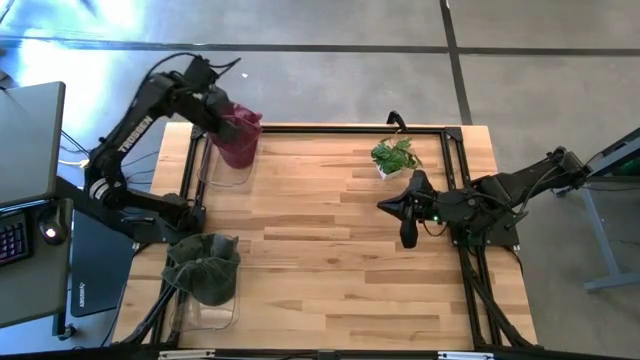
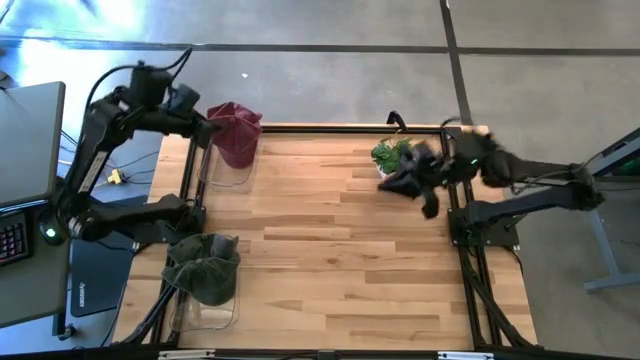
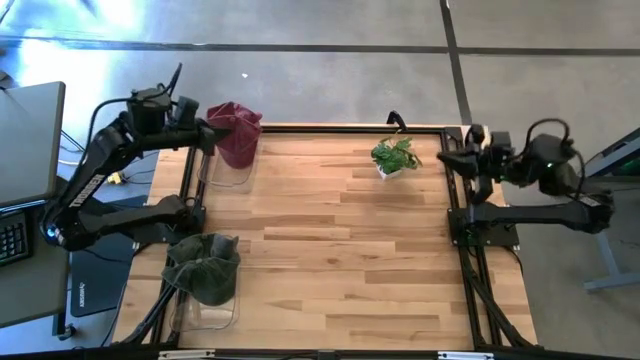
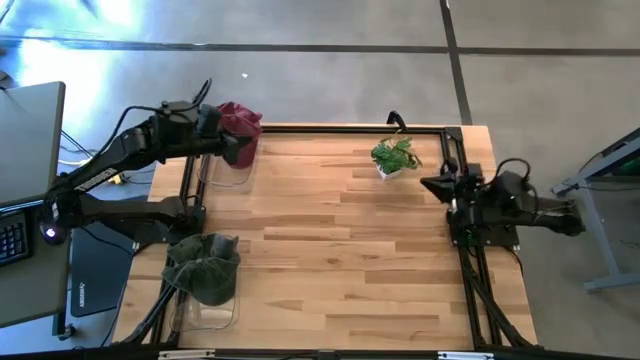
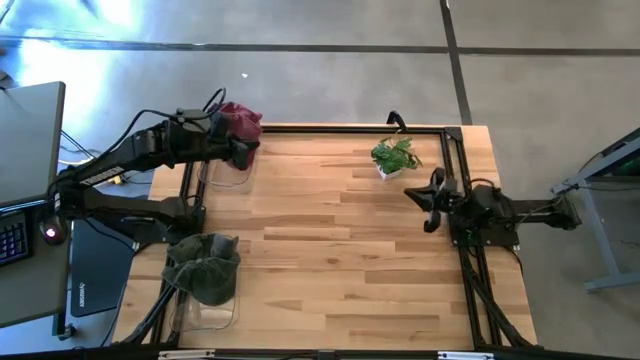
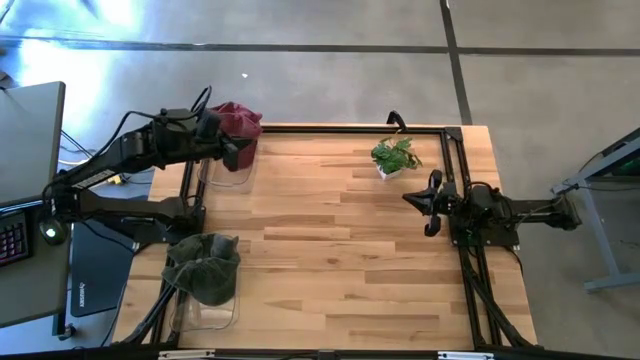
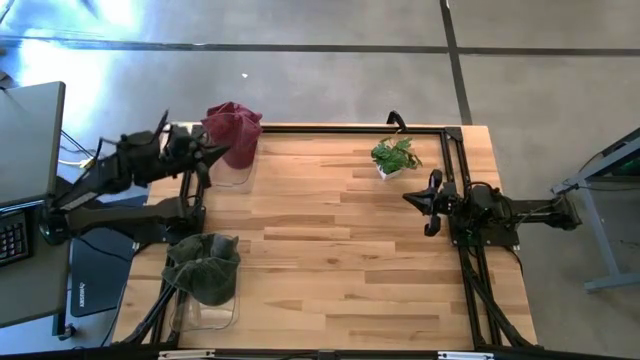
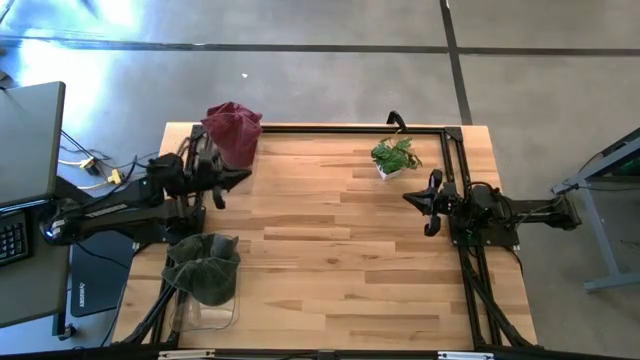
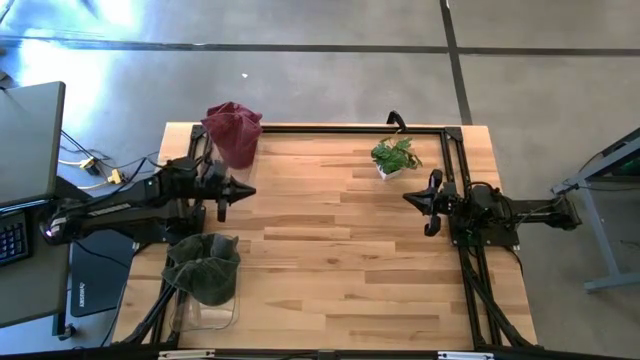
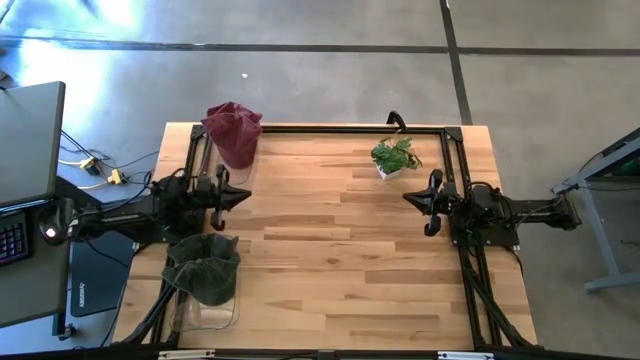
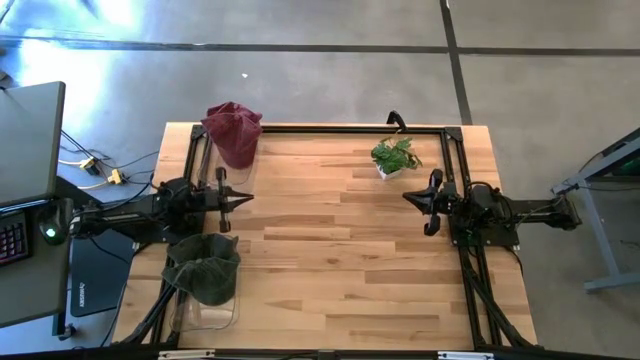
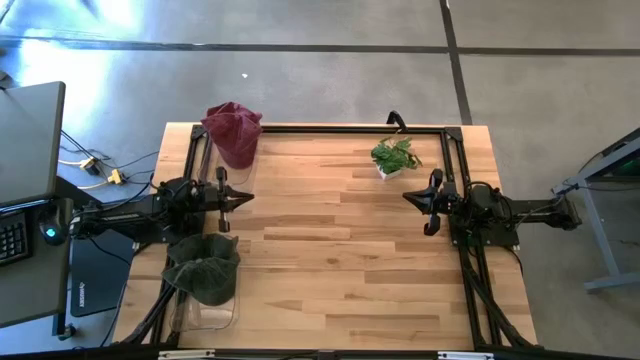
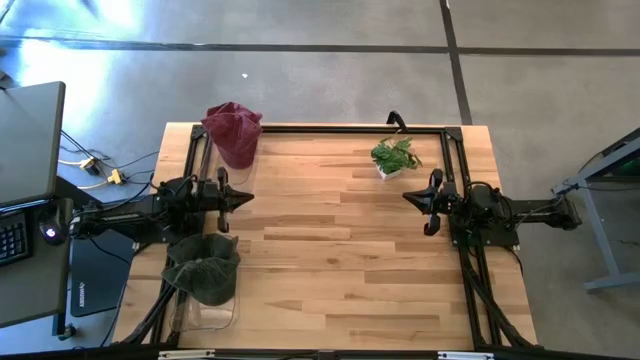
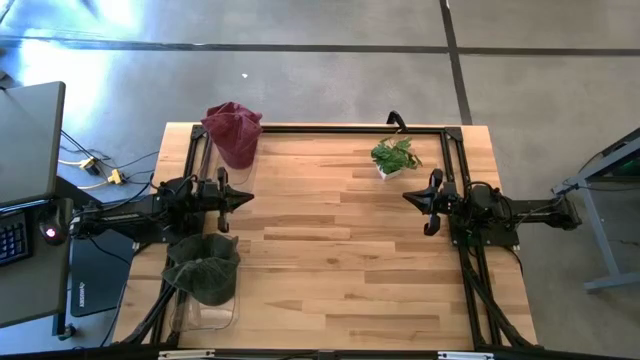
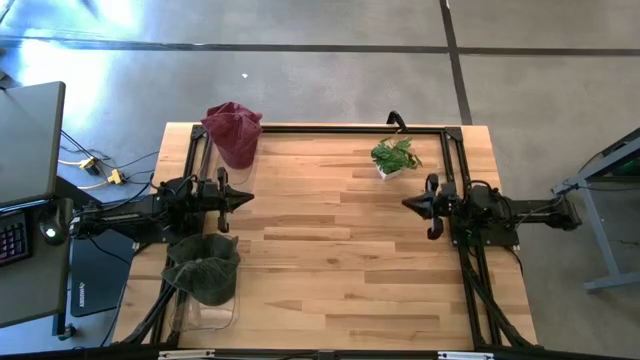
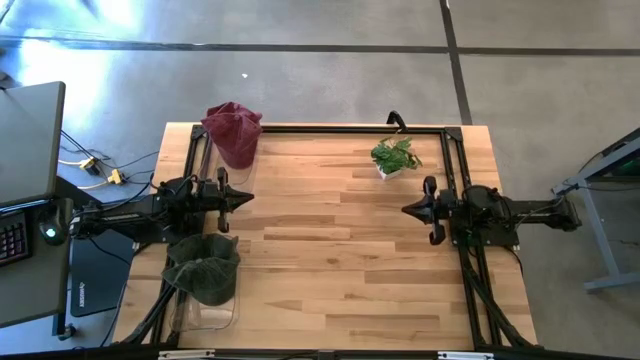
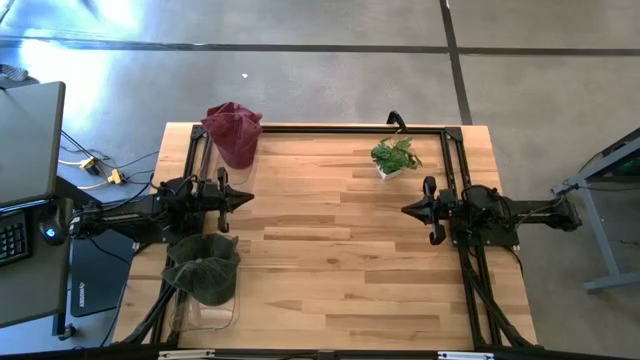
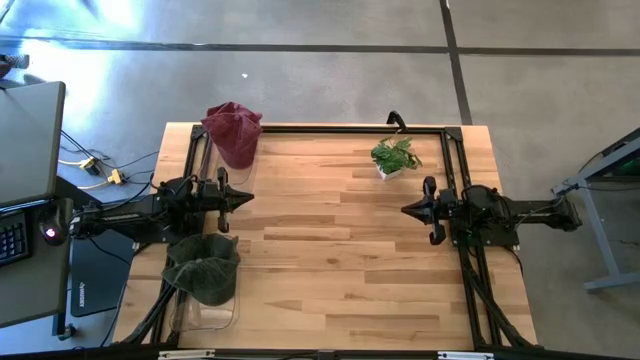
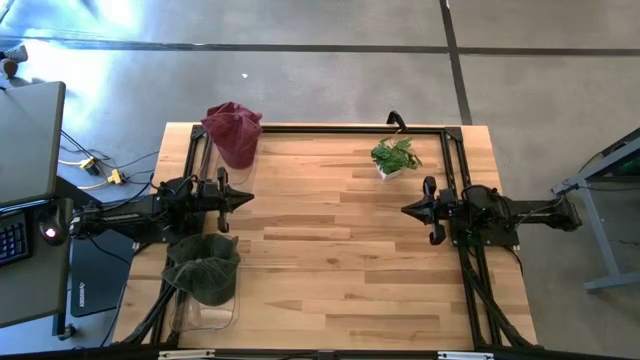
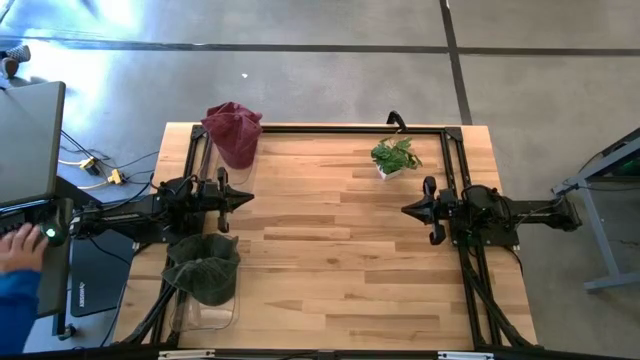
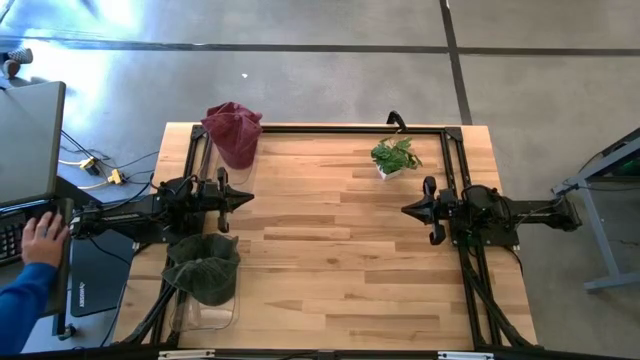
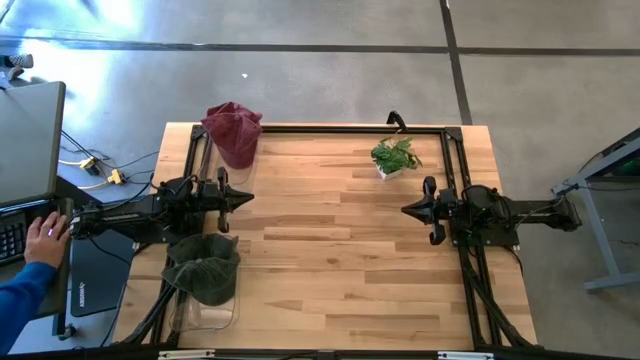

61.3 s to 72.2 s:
Task: Pick & Place hat
Return to Home Position

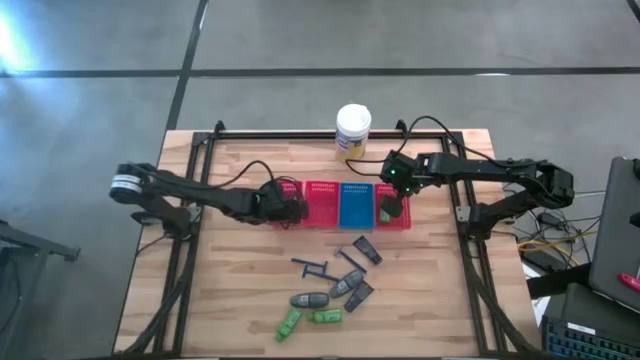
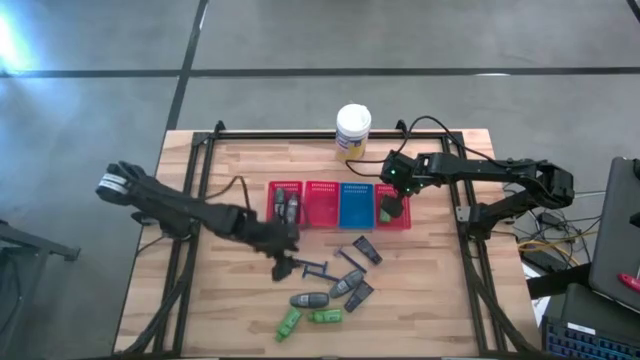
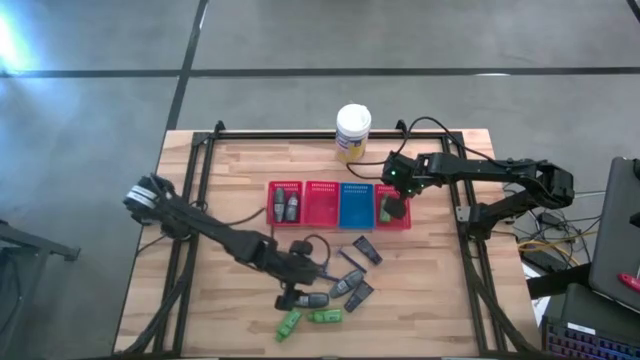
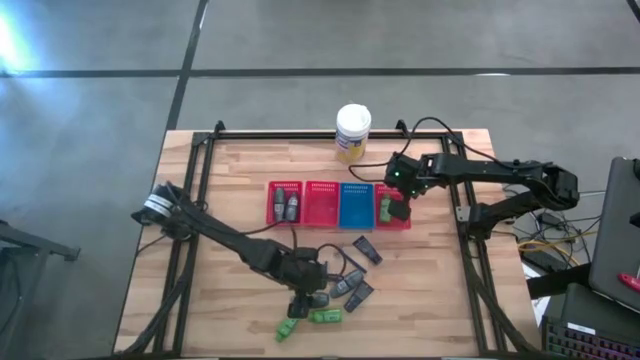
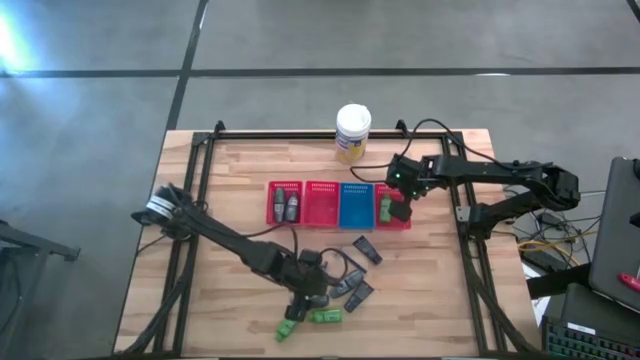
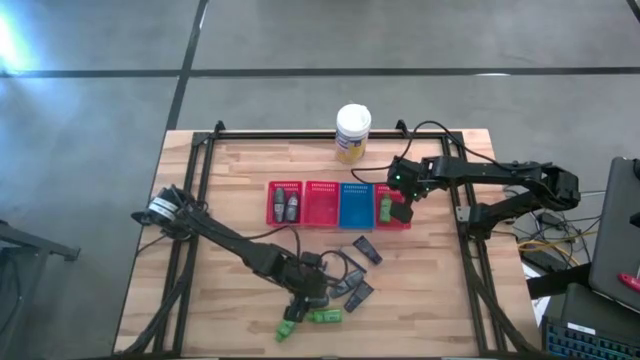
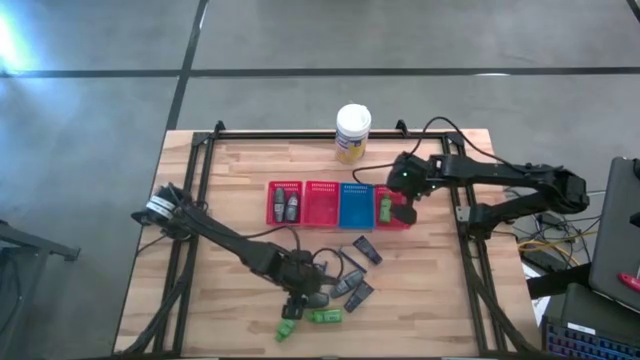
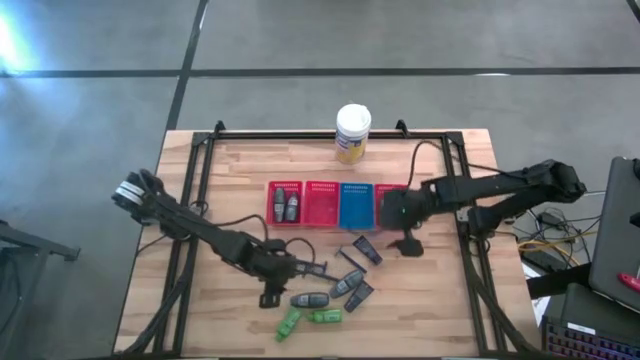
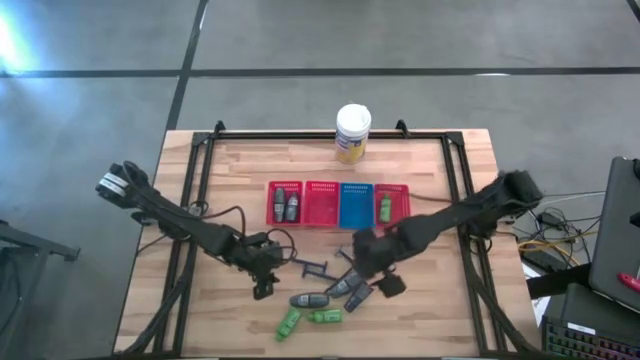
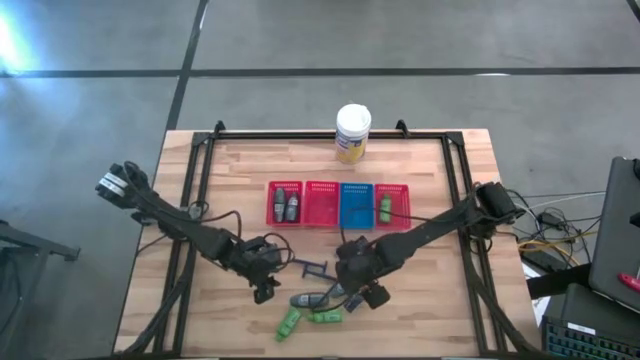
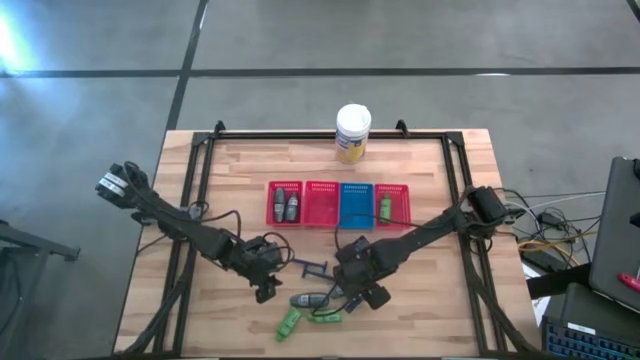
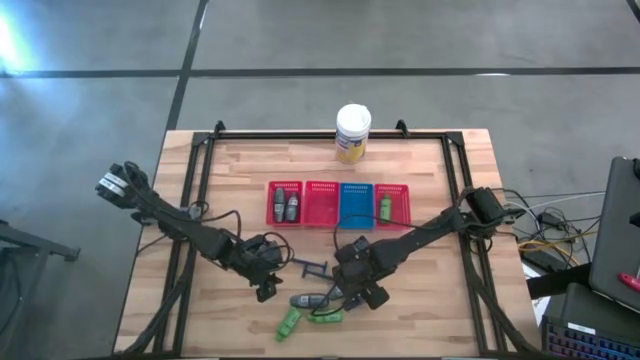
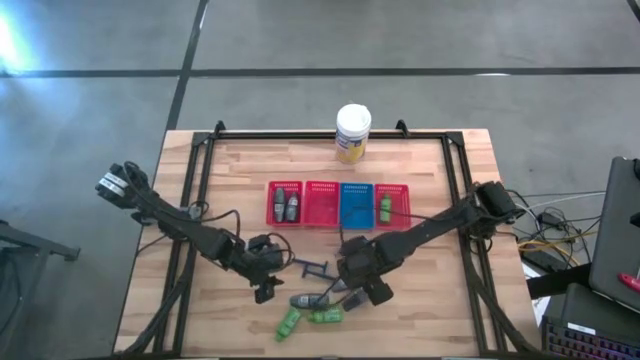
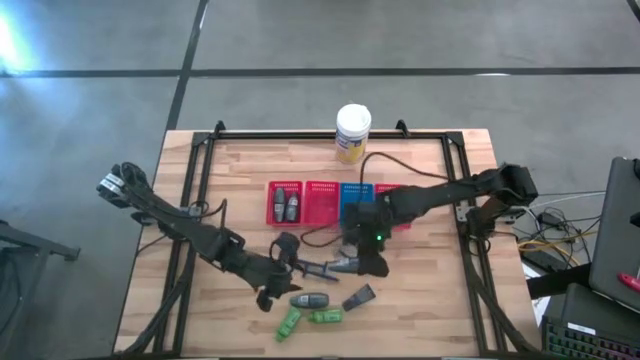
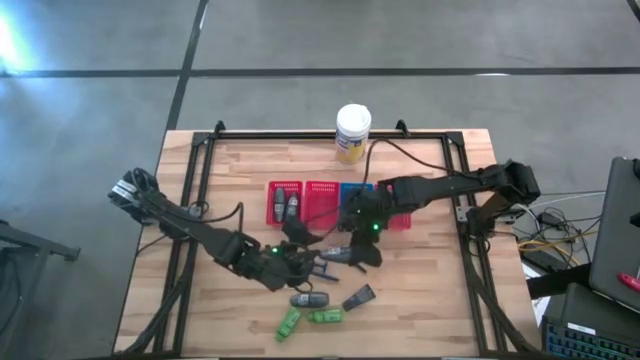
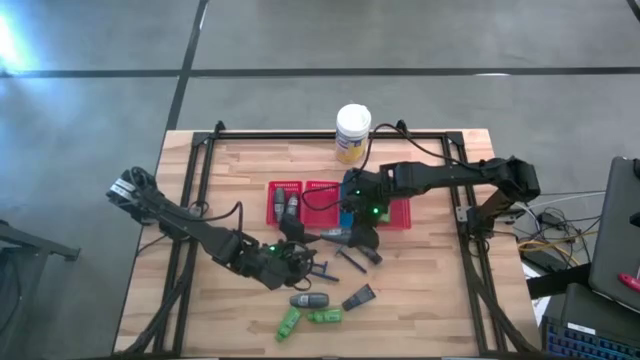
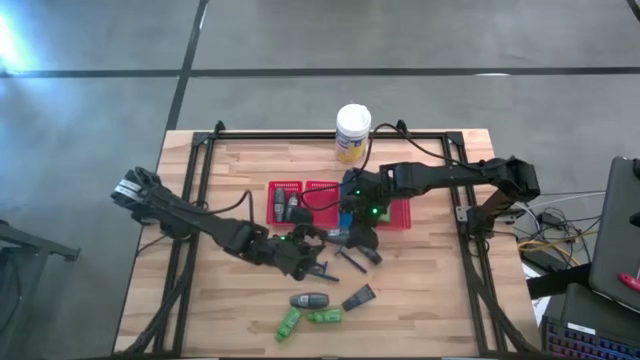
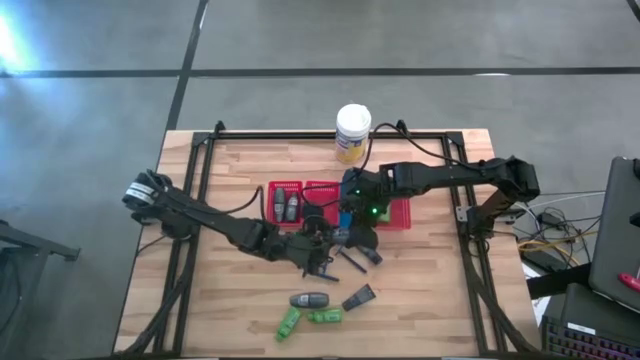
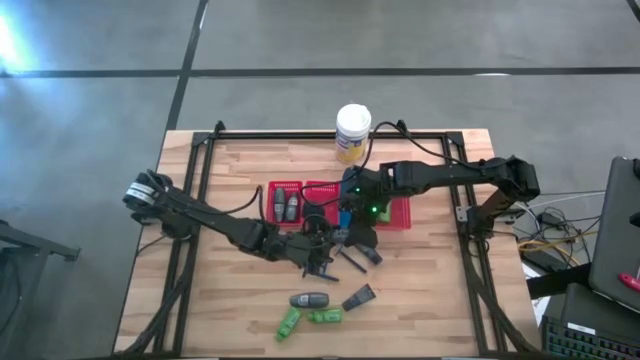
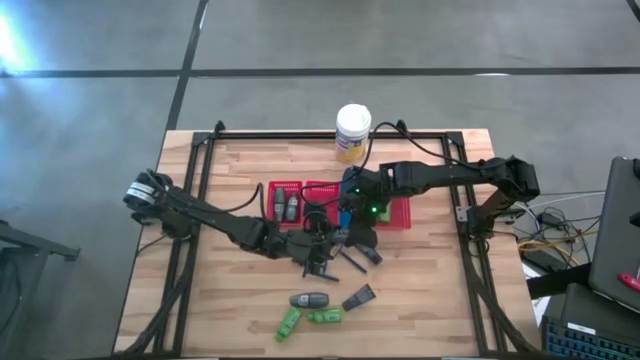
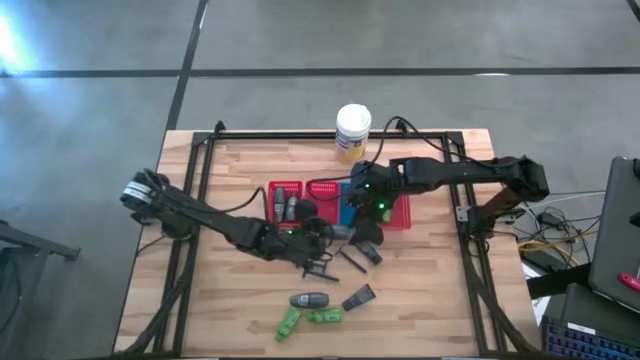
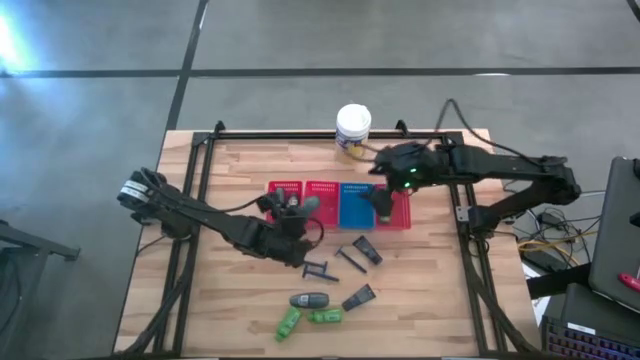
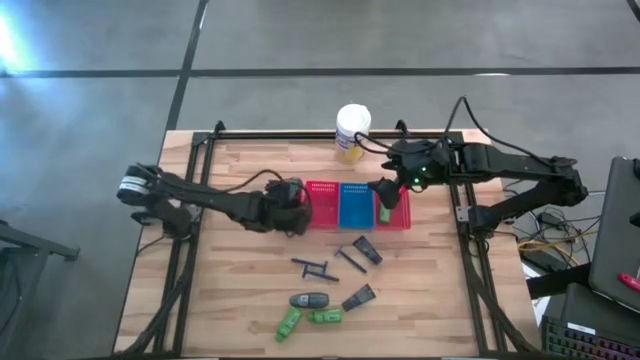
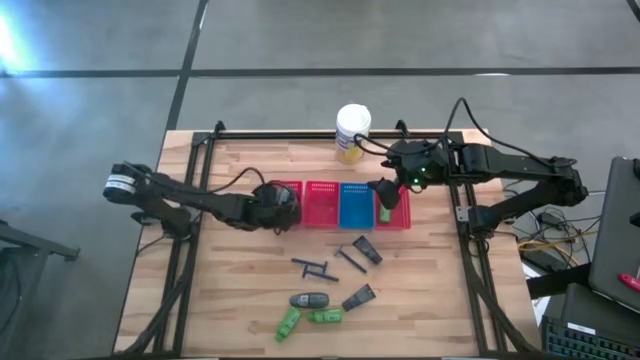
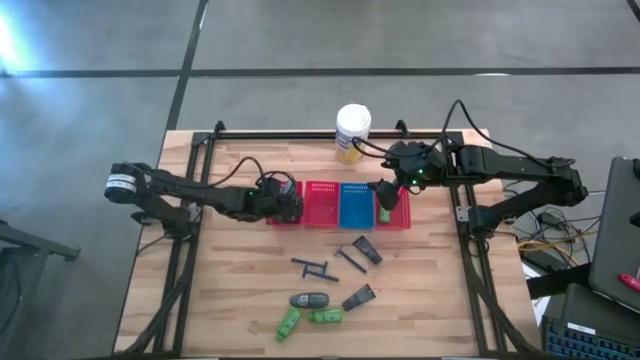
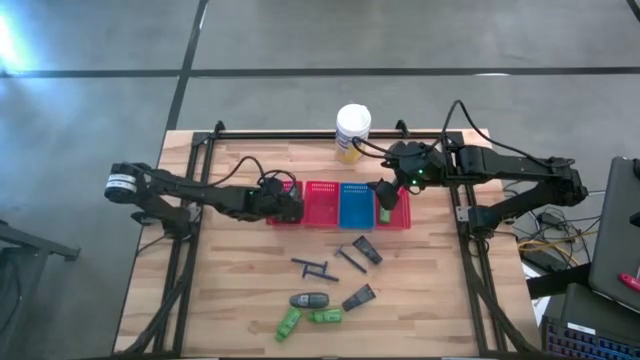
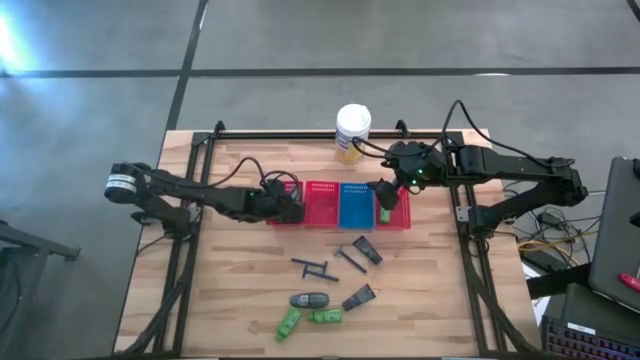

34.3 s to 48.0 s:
Task: Pick & Place Travel size toiletries
Put the black deodorant into the left red bin
